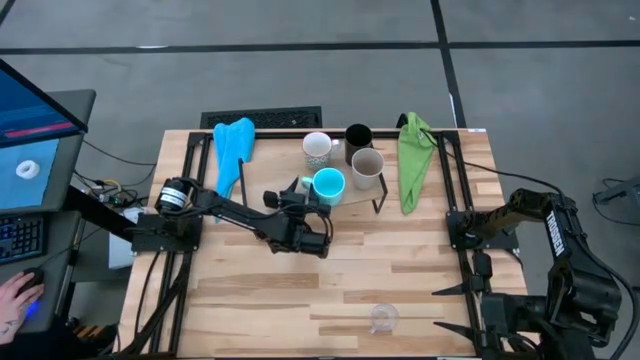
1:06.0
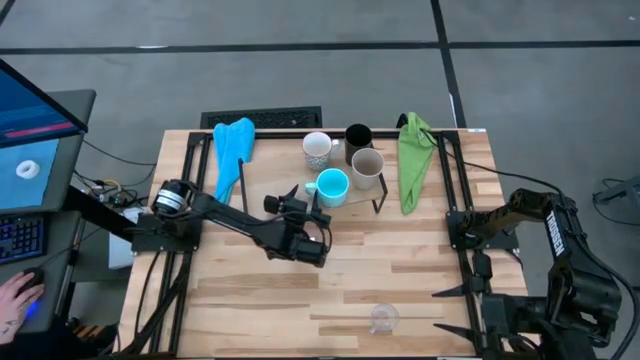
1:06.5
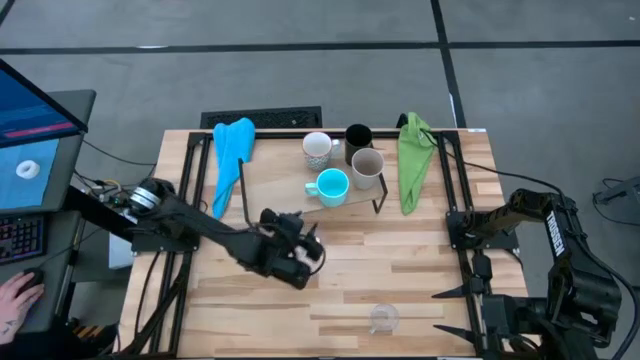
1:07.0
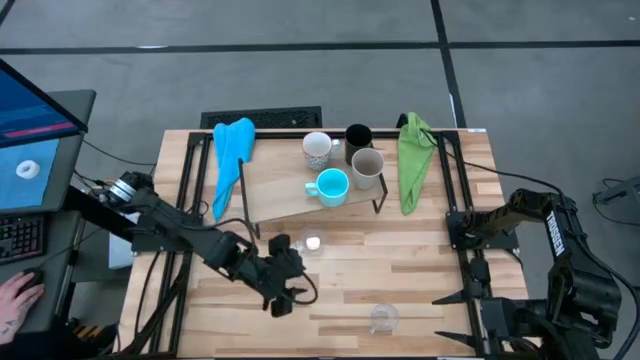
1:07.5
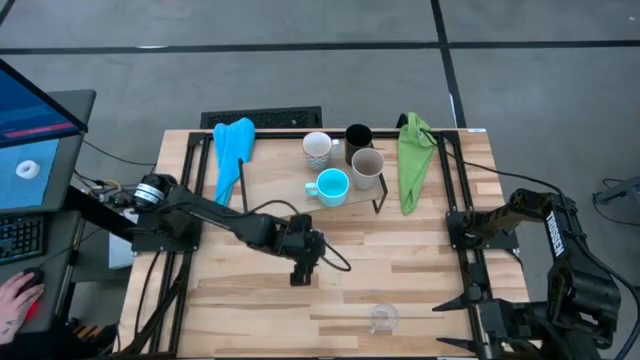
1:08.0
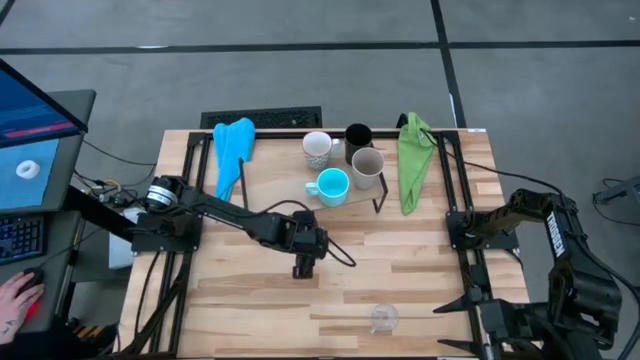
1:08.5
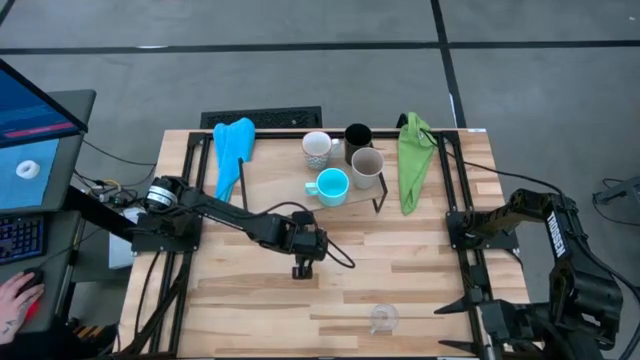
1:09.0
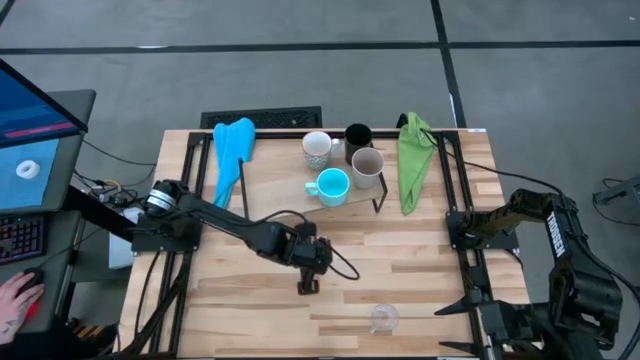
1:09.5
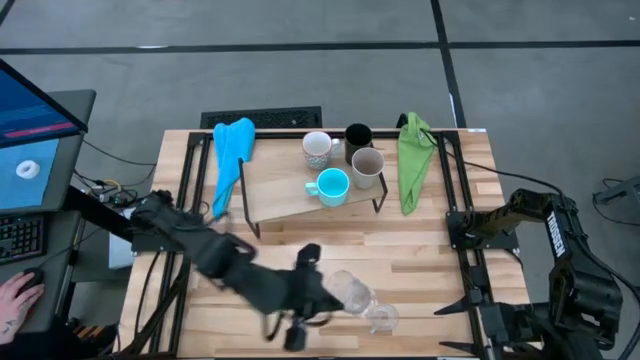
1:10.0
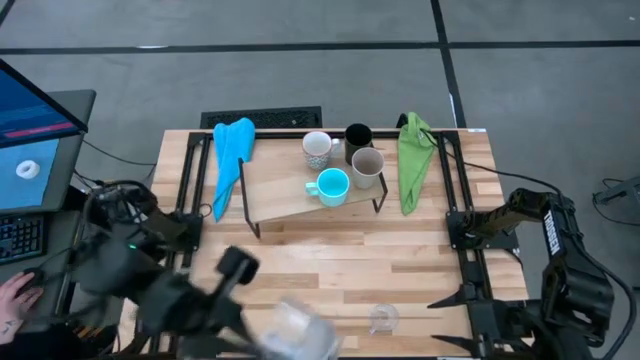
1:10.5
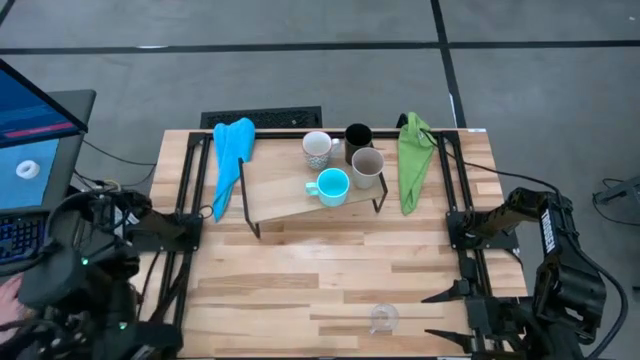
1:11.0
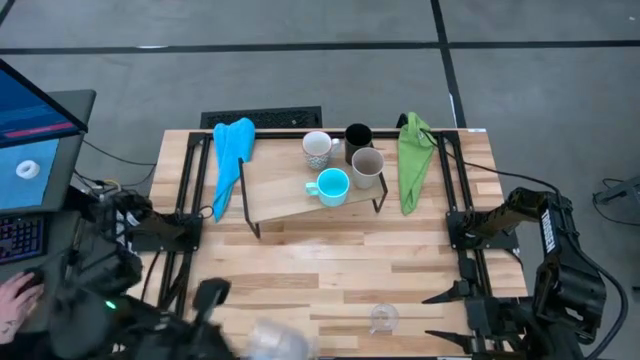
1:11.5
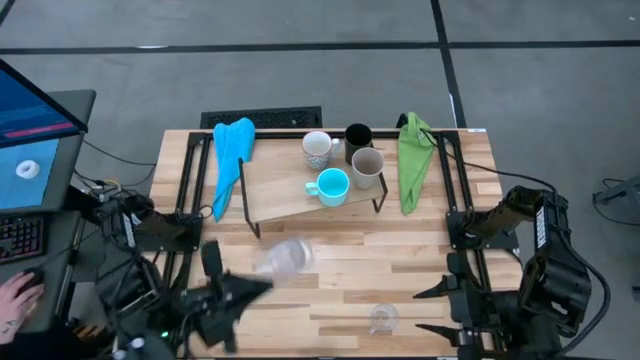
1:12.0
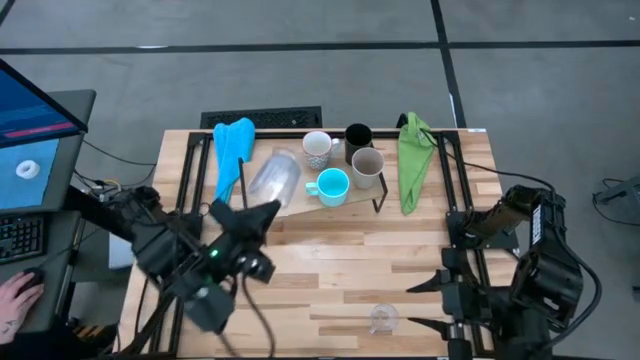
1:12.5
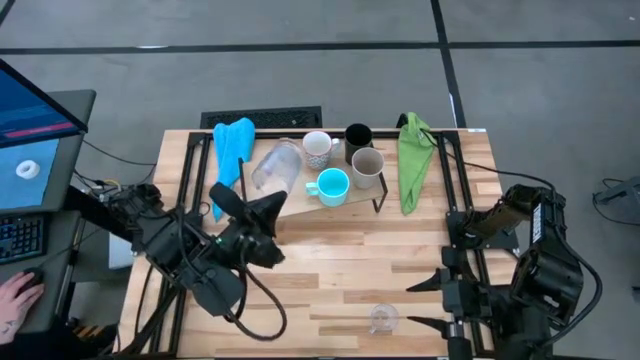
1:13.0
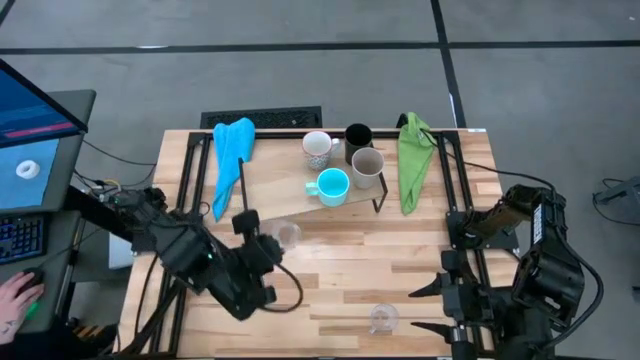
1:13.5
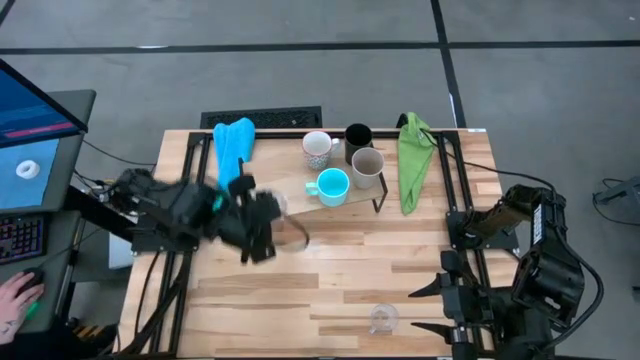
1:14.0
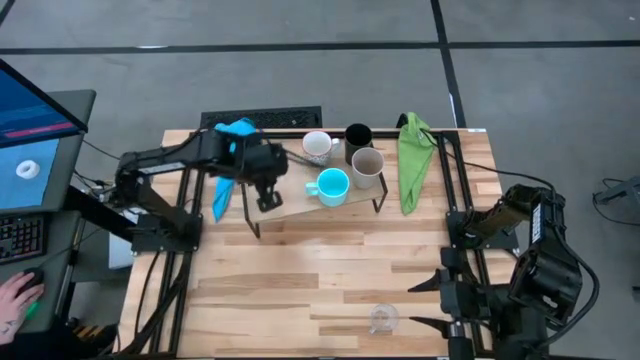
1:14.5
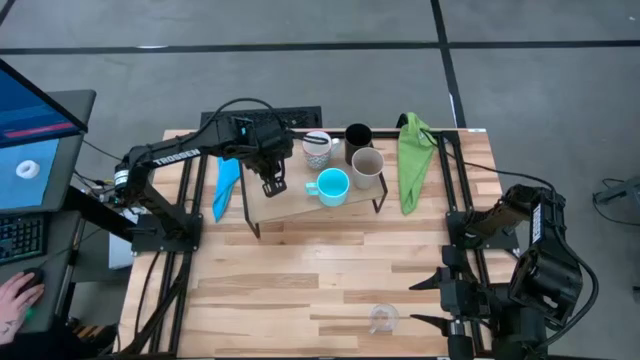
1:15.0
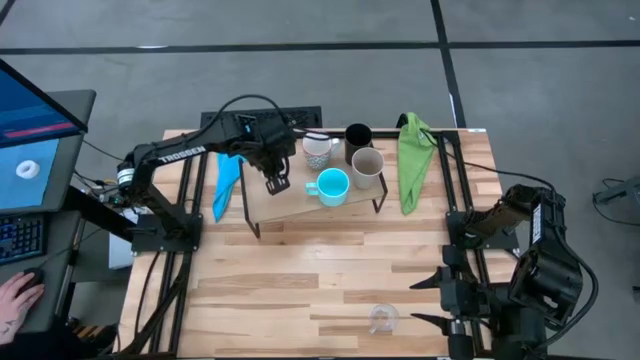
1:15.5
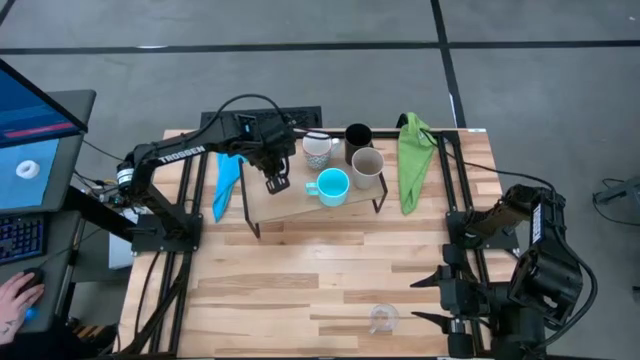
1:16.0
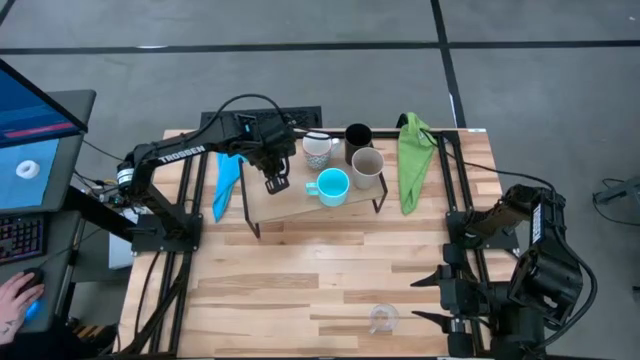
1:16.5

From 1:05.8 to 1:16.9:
Task: Stack small to large cups/mugs on shelf
Put the top transparent mug on the shelf

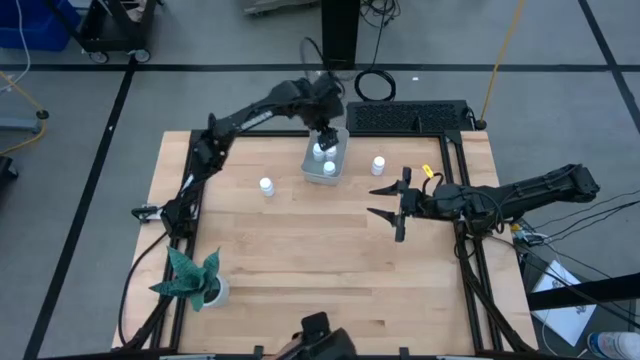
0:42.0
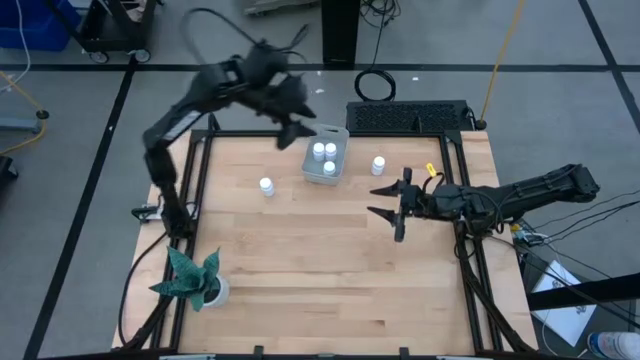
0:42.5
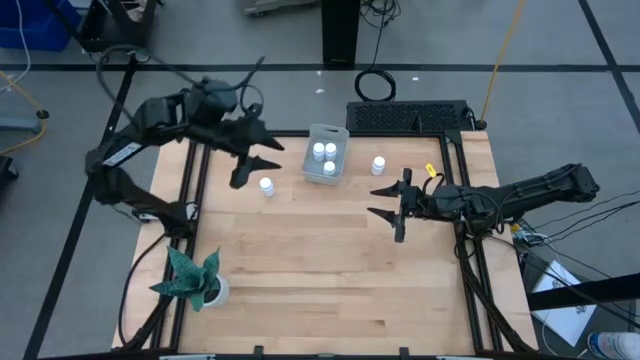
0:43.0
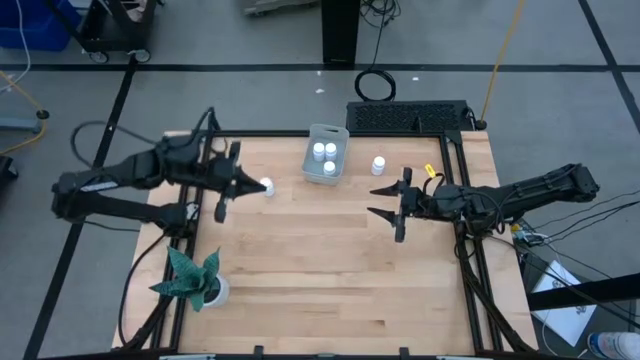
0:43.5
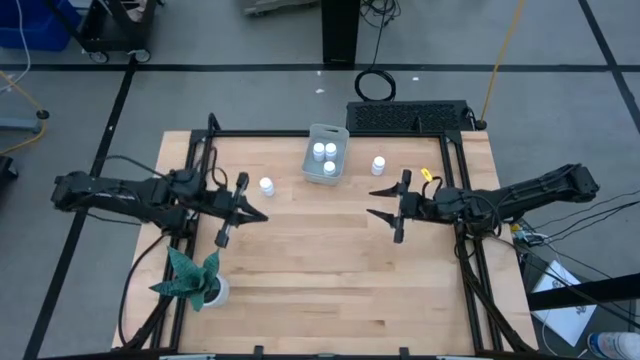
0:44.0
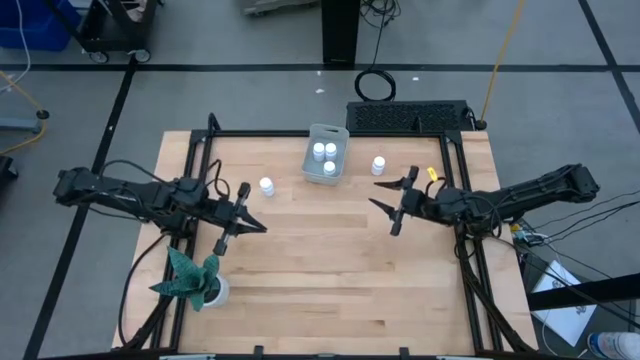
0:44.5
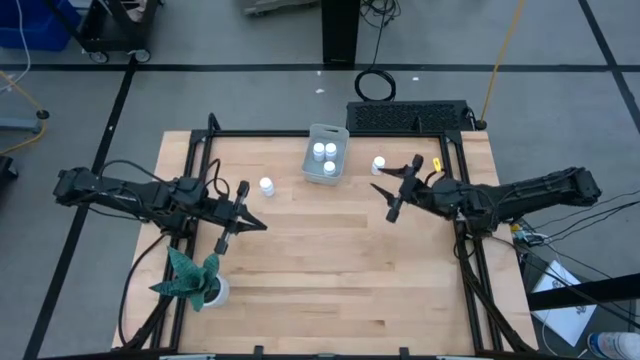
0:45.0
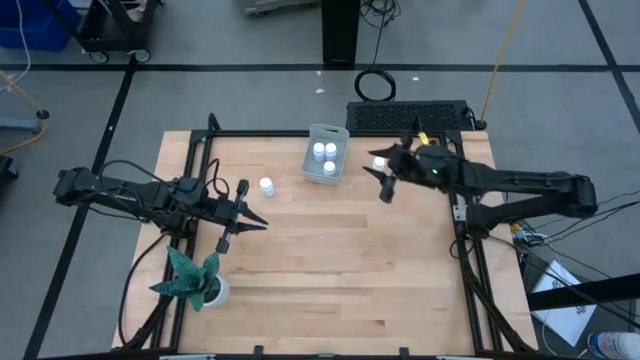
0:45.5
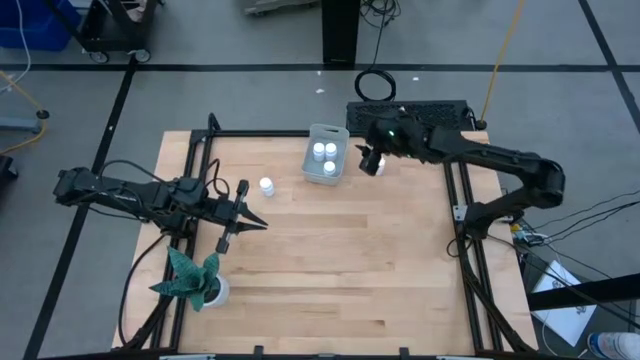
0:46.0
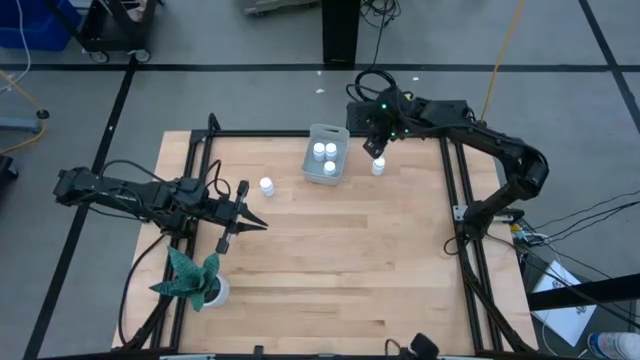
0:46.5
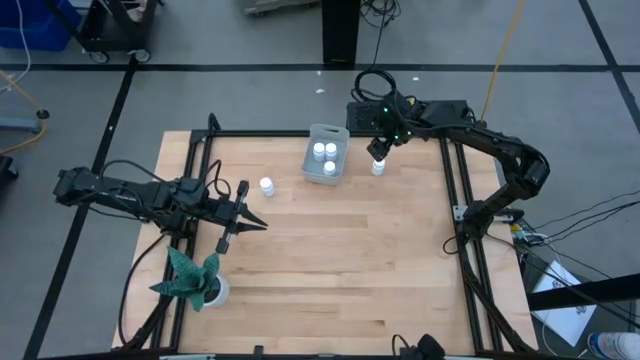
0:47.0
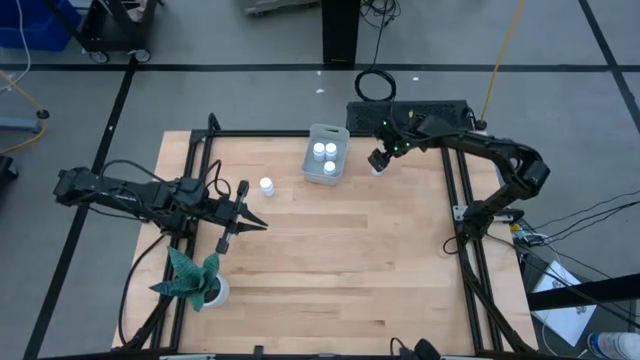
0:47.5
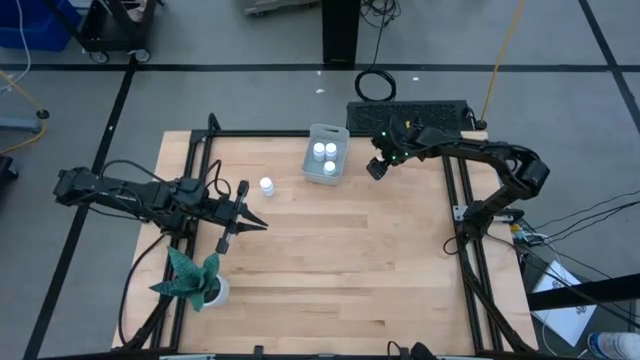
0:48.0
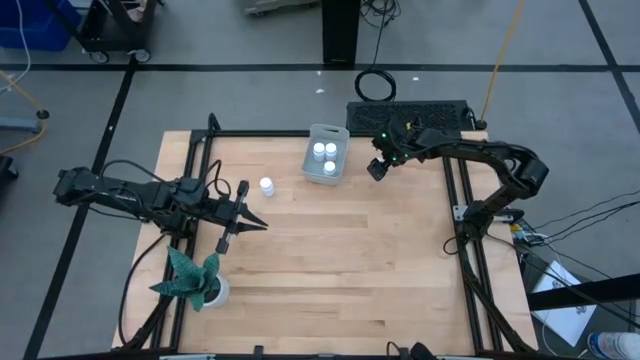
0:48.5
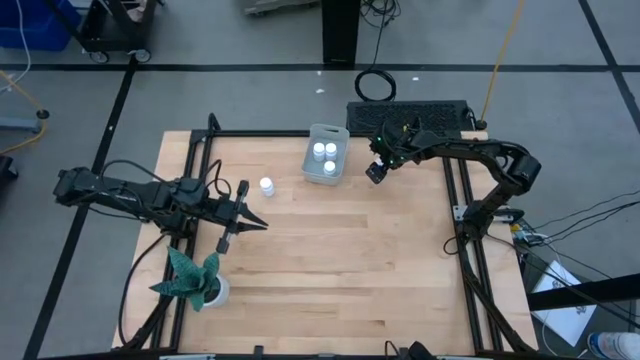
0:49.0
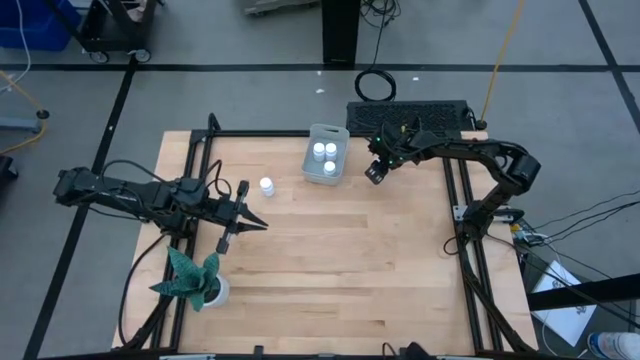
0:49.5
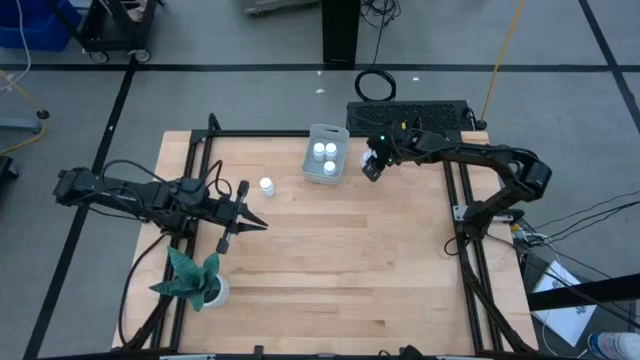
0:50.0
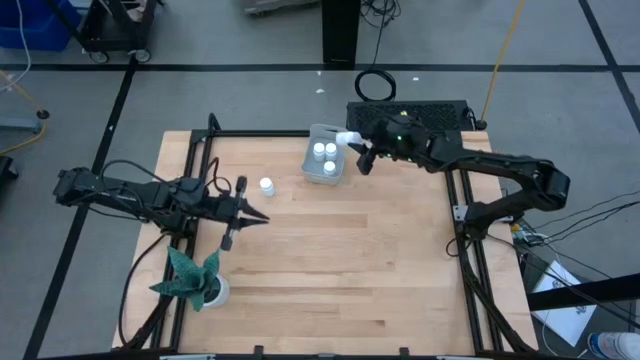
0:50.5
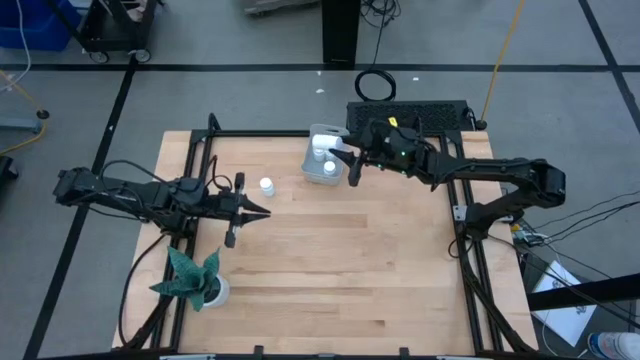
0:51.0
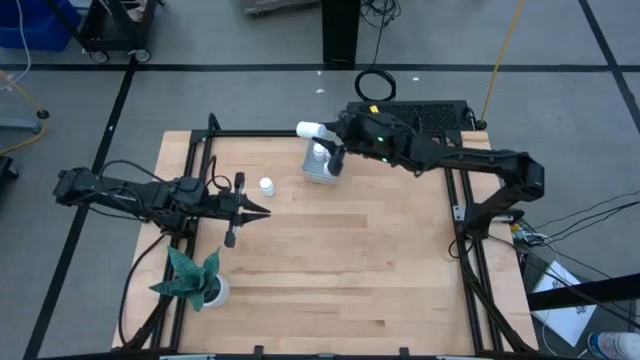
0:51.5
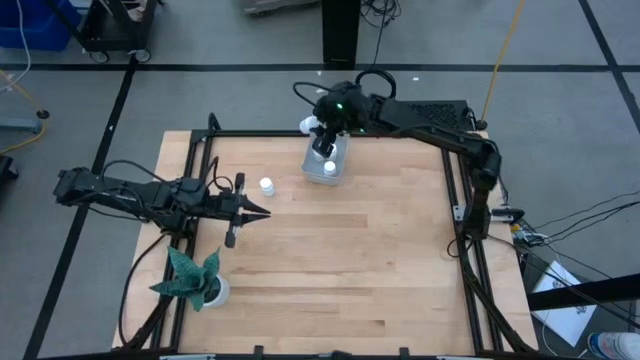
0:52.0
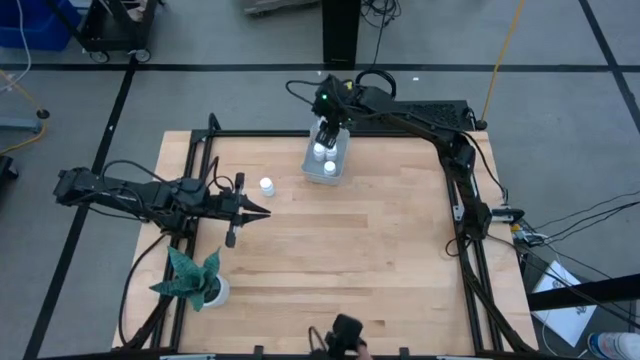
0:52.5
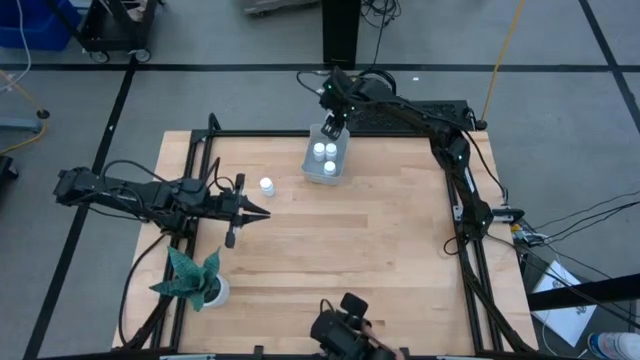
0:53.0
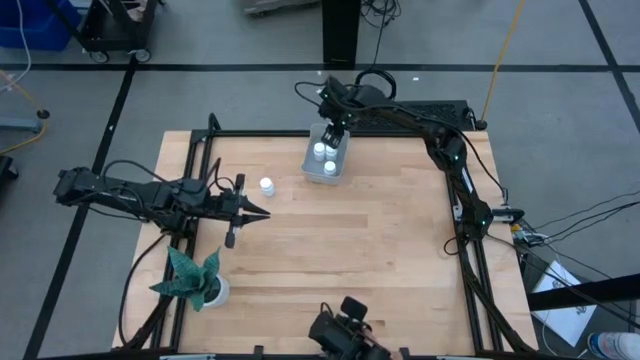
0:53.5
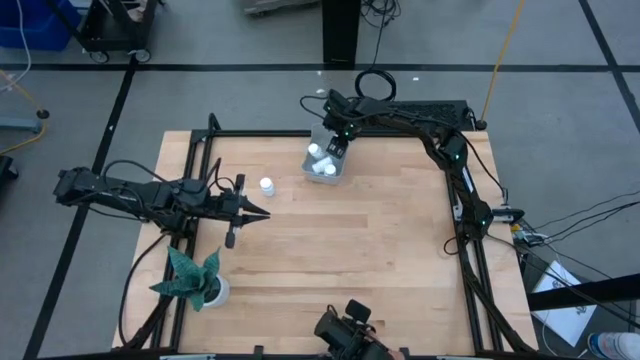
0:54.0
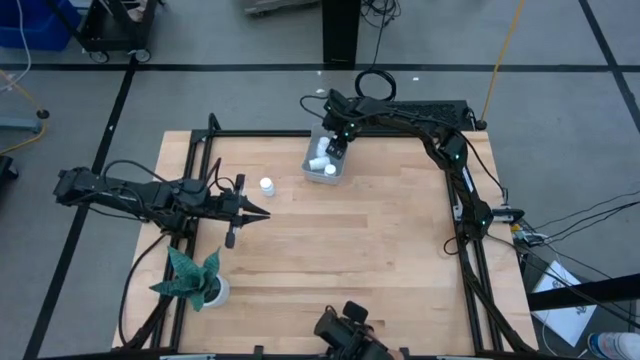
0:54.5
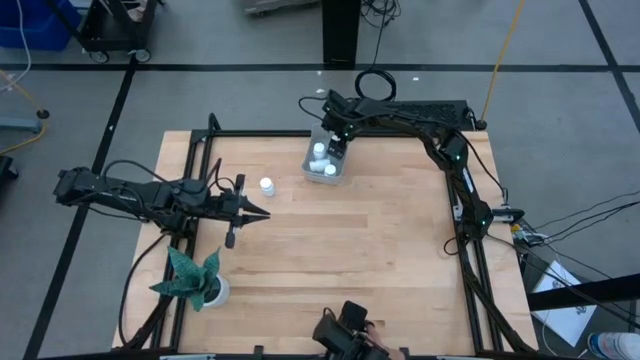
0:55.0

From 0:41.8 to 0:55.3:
Task: Pick and place pill bottles into a basket
Put the white medicine bottle into the gray bin
